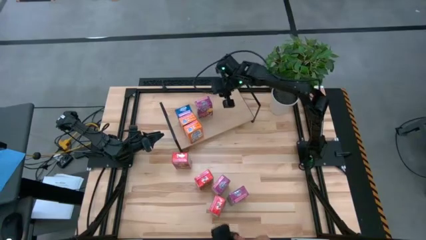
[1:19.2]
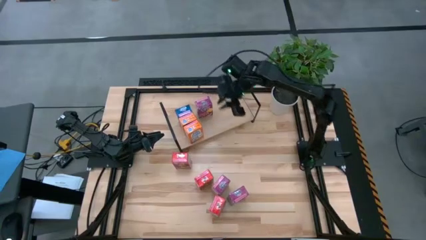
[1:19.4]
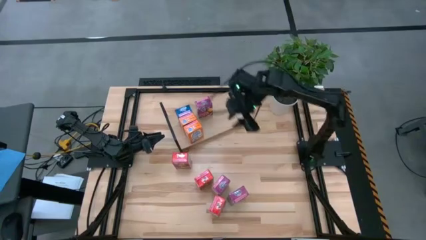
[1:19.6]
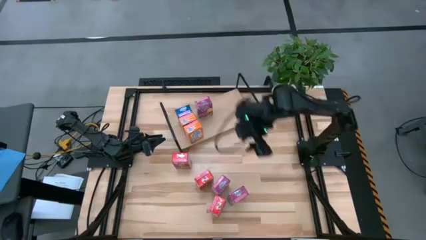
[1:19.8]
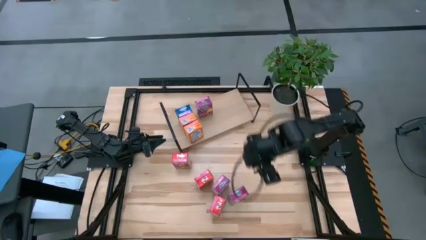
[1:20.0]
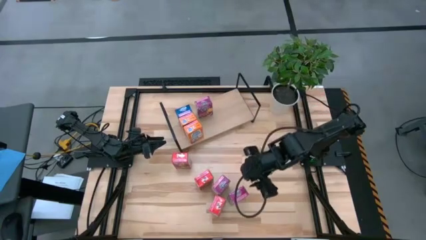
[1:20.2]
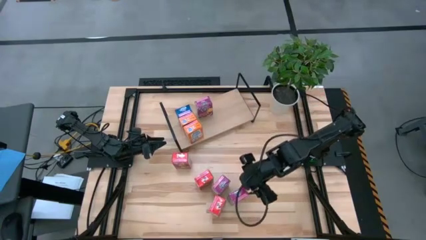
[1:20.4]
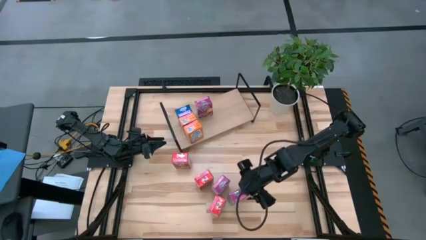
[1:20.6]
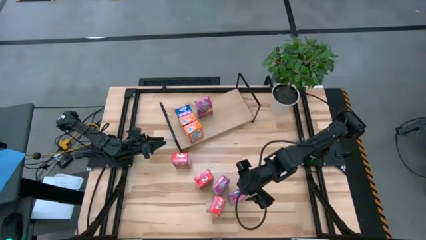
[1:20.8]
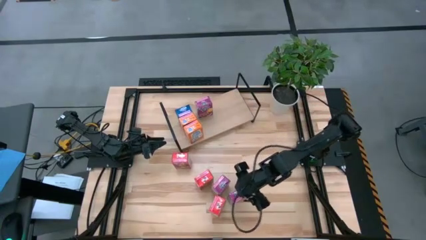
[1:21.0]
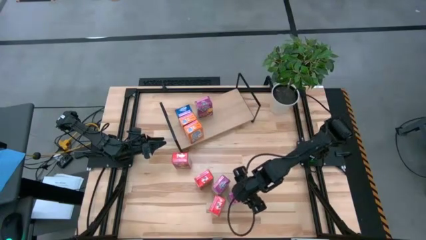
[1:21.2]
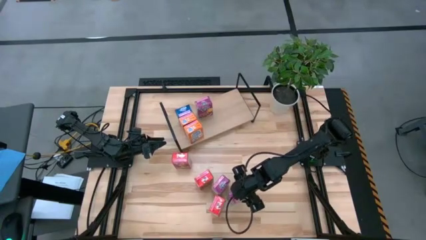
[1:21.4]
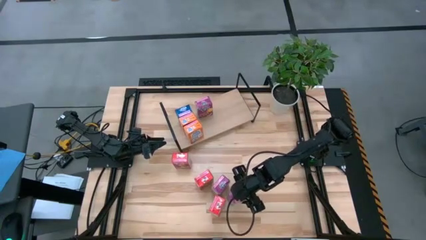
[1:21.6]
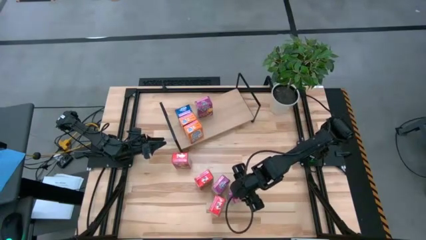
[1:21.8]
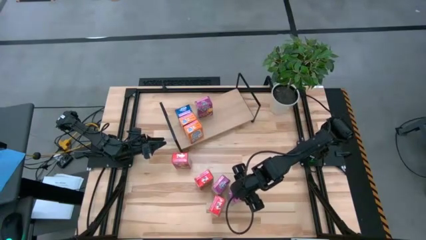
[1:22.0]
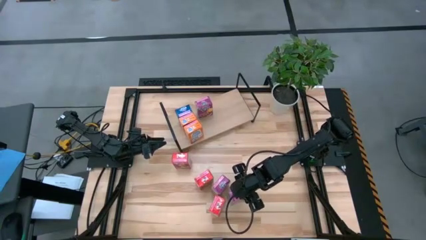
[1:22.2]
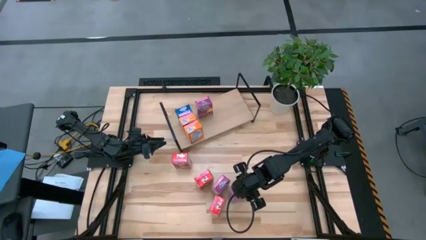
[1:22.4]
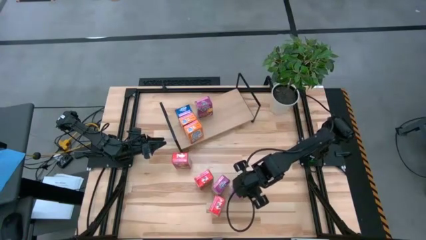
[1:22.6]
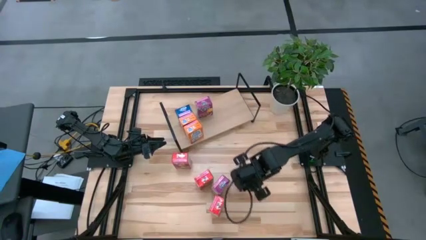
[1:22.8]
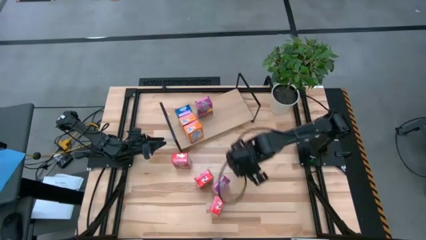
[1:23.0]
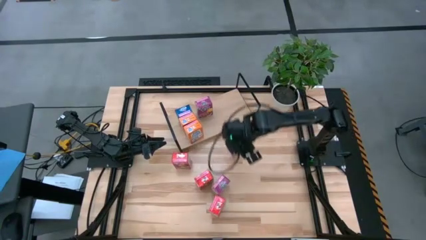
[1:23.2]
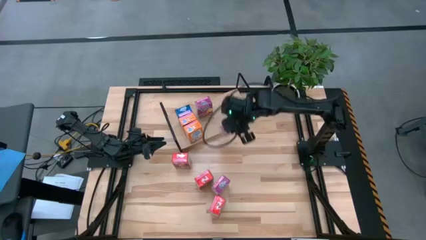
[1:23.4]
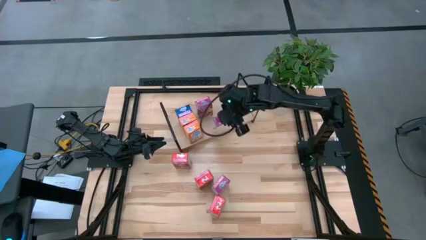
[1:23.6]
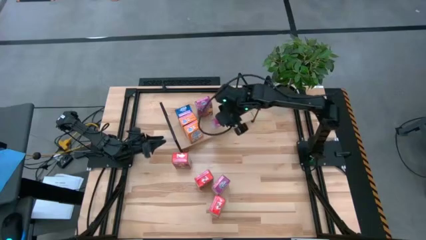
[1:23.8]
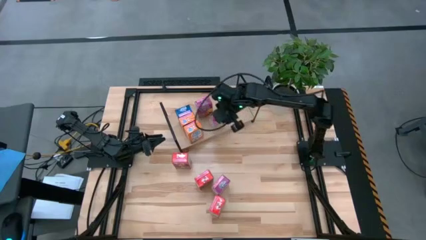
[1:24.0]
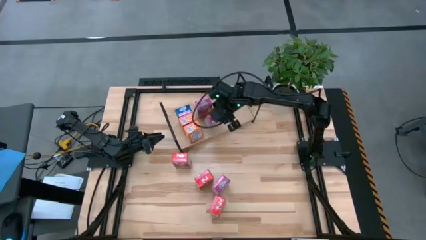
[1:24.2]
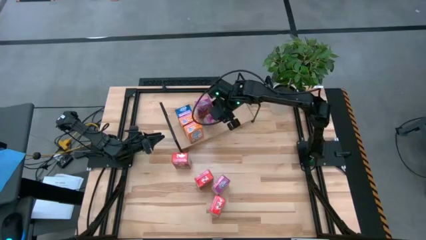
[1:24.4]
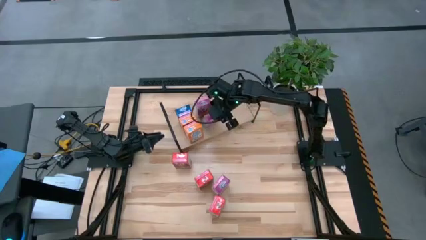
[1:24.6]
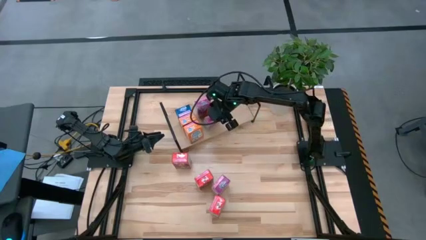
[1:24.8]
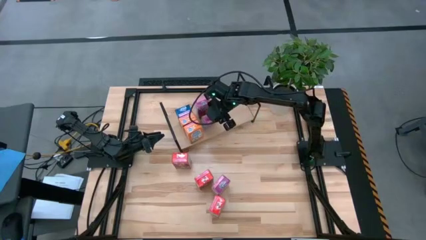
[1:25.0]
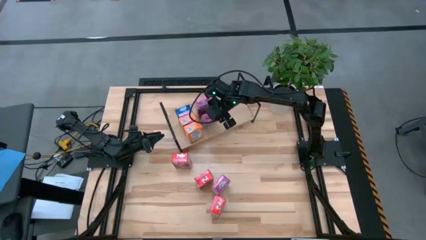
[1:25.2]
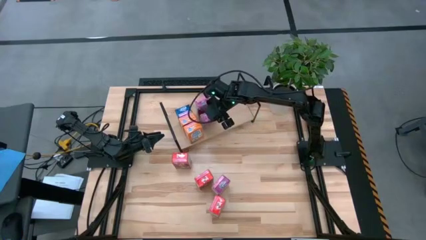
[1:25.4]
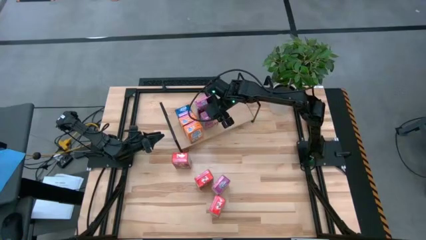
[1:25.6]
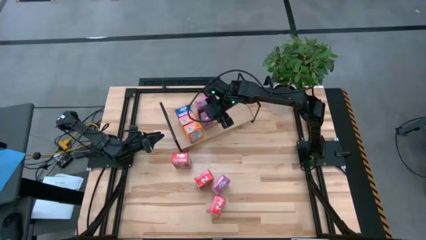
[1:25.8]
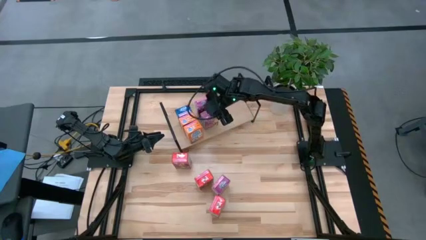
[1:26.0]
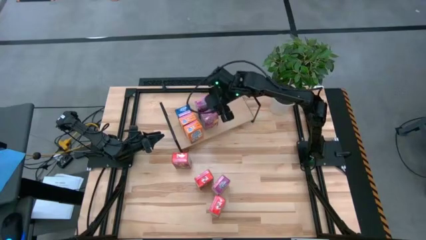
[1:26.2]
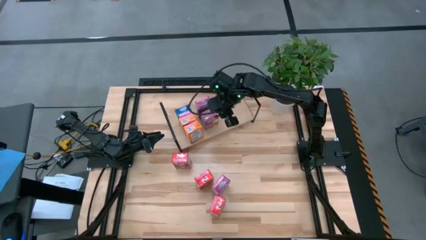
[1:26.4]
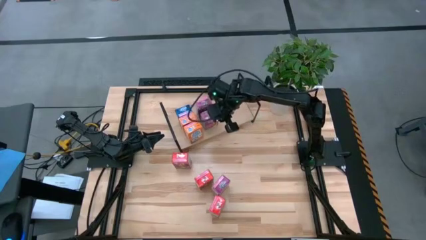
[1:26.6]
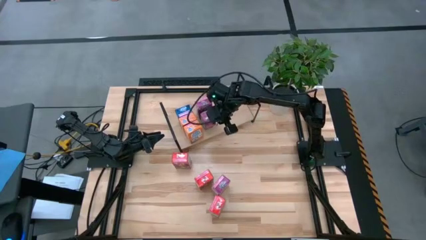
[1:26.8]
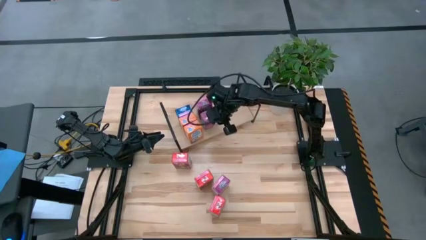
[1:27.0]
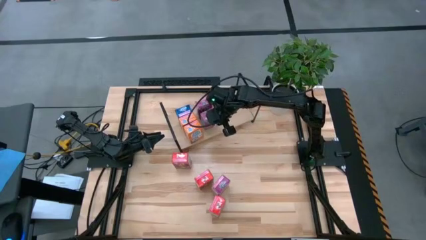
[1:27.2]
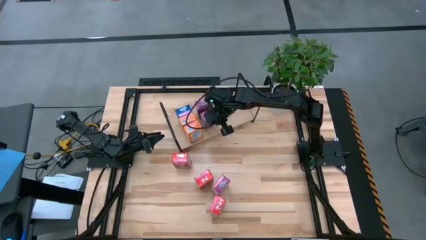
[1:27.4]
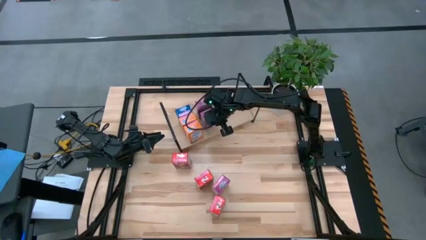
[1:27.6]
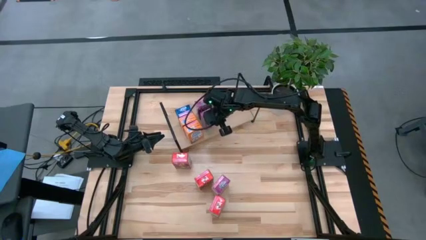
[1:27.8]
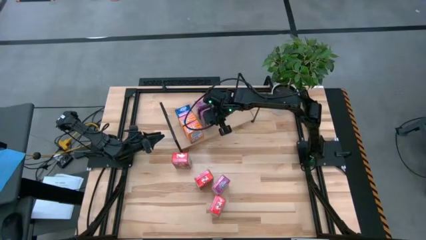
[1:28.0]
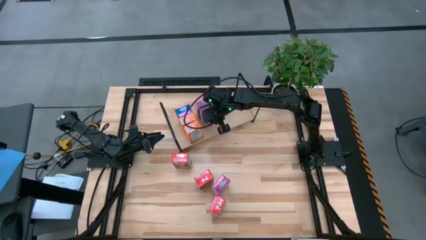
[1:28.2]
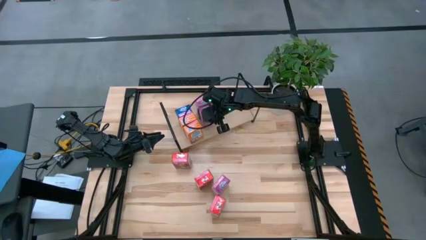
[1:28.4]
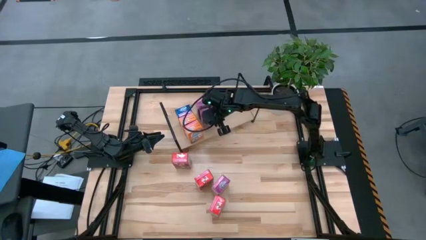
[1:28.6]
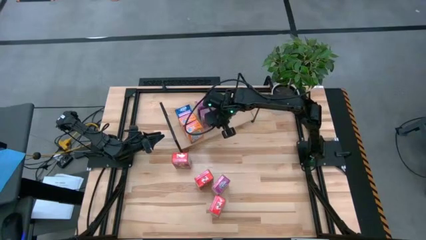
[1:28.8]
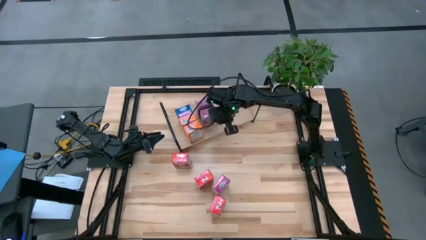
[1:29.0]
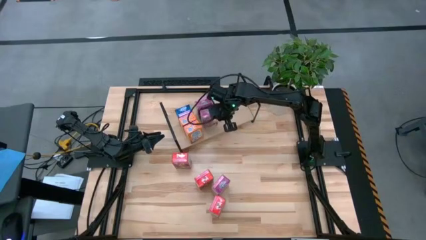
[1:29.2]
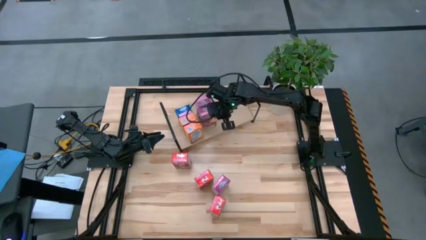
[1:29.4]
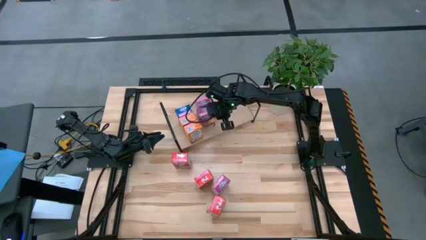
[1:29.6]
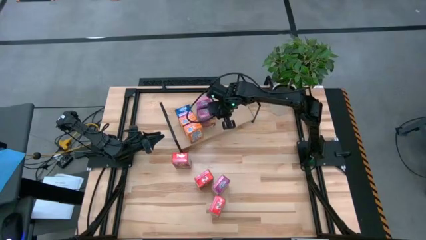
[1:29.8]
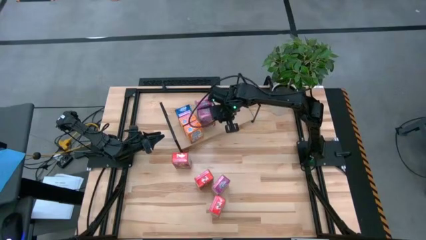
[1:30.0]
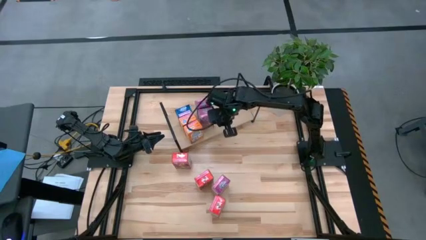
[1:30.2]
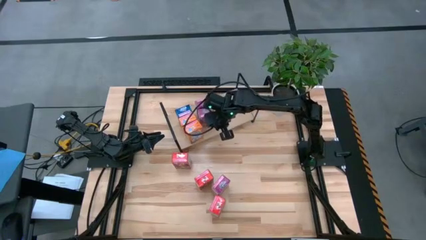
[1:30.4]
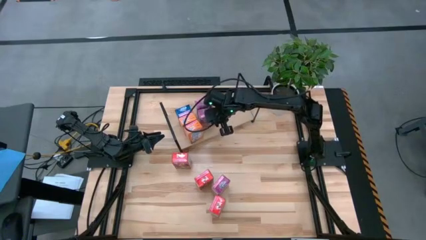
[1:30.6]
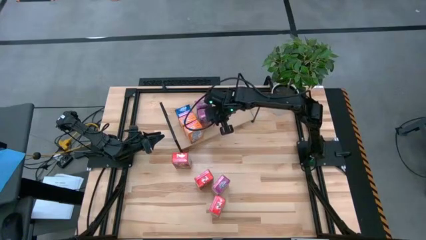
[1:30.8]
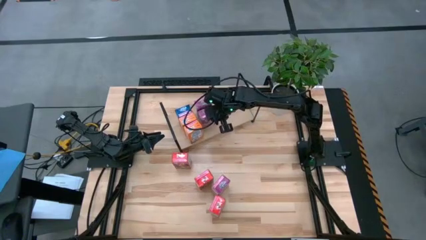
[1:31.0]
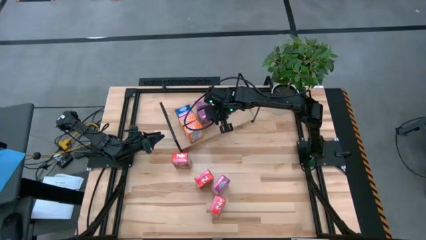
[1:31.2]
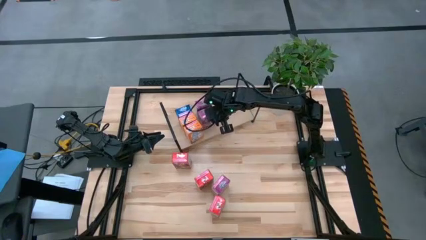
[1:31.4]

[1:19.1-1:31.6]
Task: Stack cereal on shelf
Put the bottom purple cereal box on the shelf aligned with the other purple cereal box

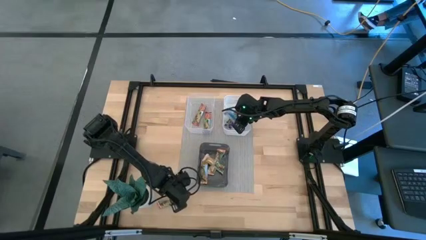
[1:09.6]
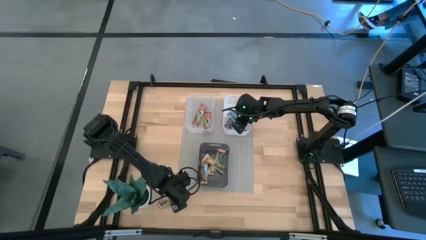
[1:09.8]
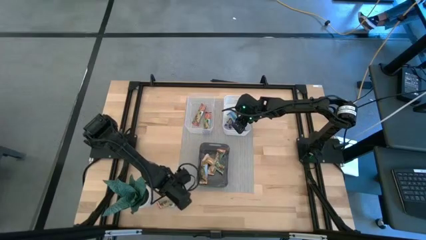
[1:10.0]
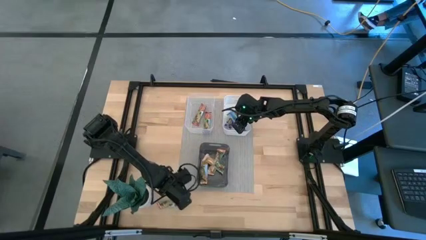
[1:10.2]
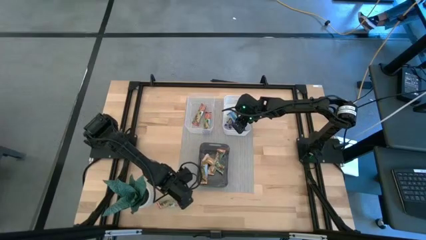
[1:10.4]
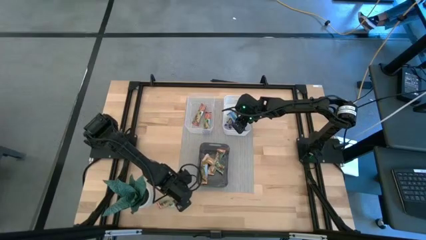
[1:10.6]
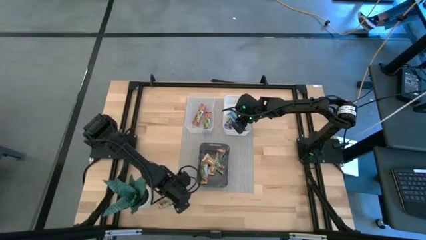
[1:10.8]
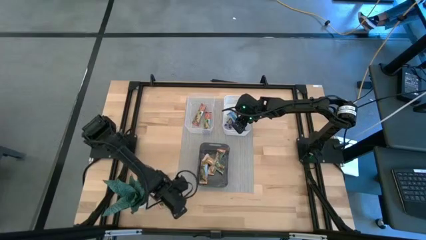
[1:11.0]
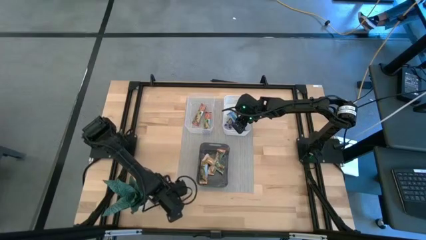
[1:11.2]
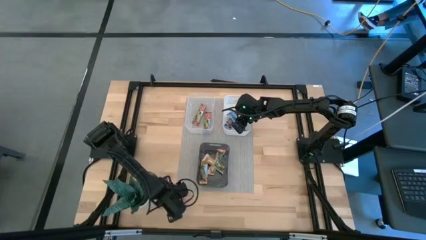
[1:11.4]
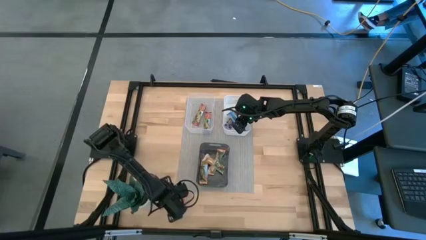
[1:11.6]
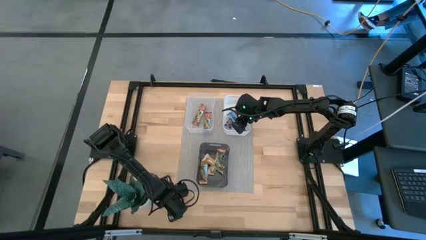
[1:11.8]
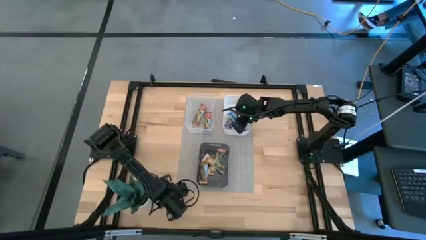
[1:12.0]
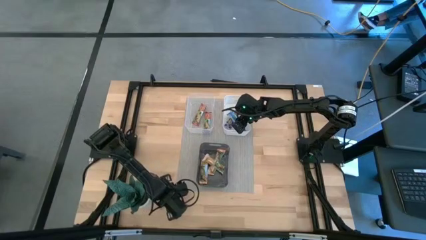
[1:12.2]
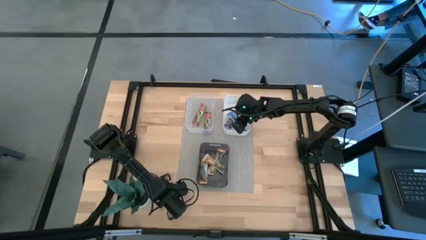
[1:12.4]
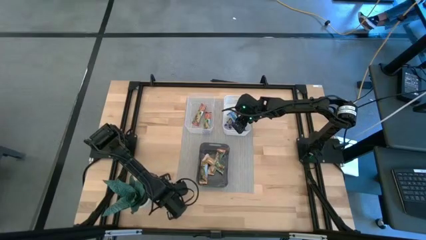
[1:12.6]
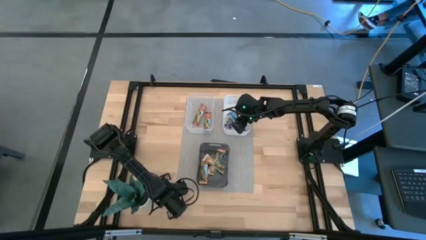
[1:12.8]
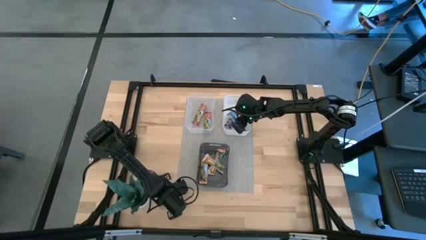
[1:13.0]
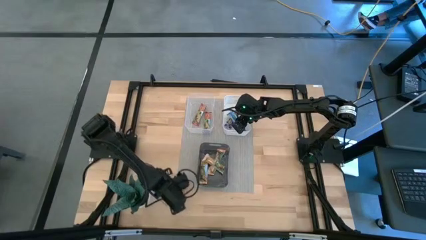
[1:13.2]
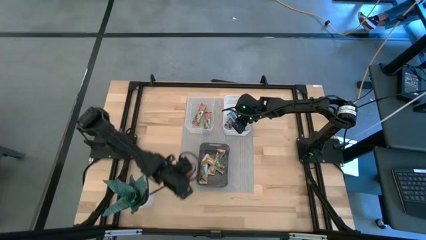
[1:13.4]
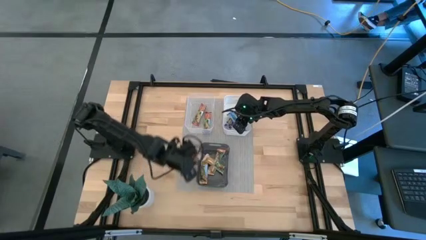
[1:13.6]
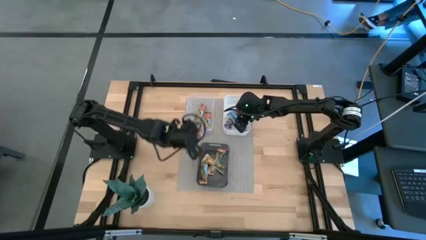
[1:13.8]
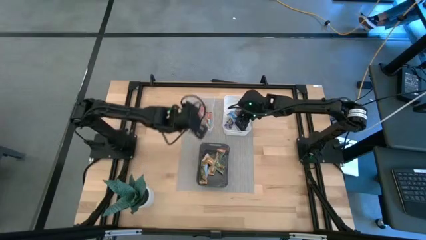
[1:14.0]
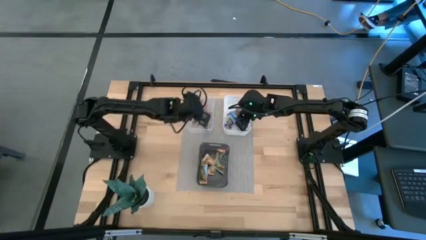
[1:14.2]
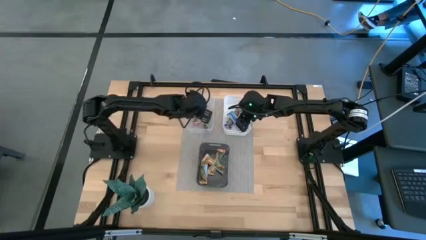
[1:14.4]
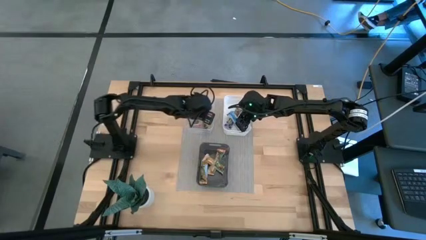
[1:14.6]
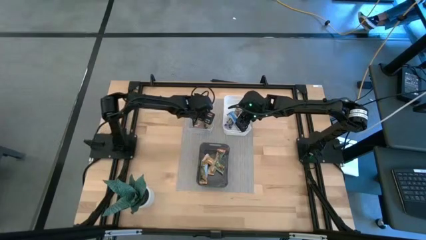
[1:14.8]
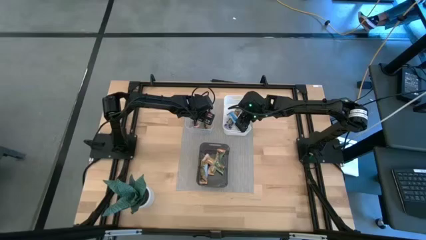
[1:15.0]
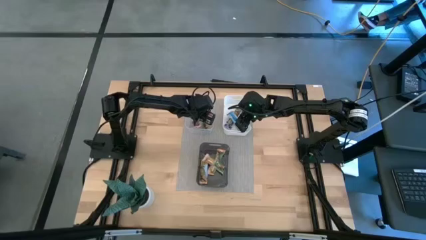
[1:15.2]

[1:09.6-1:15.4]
Task: Pick and place Granola Bars by type
Put the red granola bar into the transparent bin
